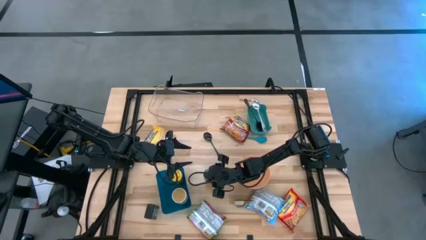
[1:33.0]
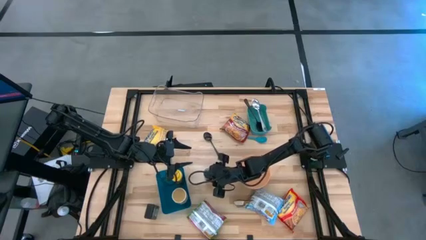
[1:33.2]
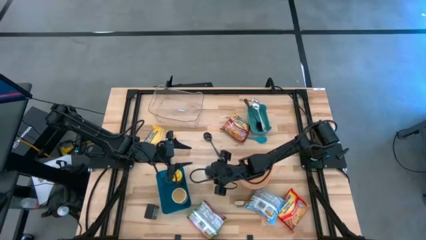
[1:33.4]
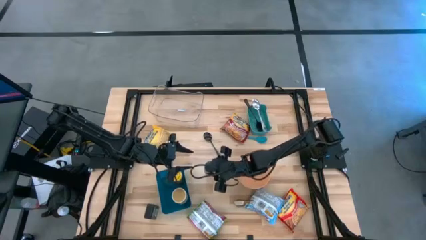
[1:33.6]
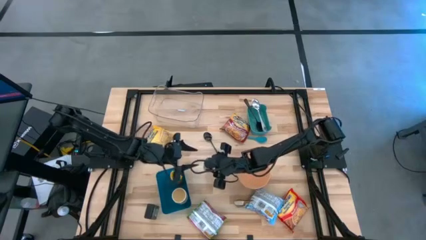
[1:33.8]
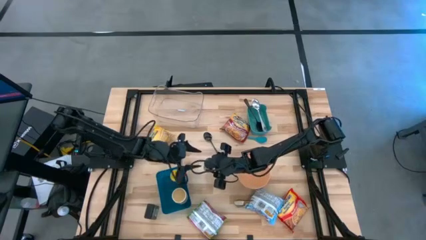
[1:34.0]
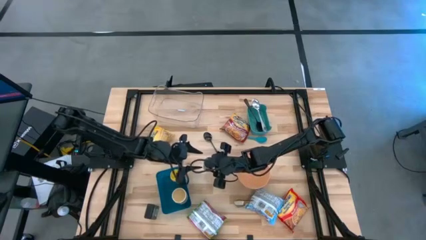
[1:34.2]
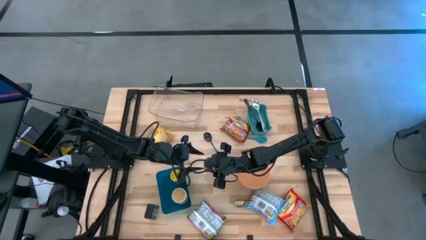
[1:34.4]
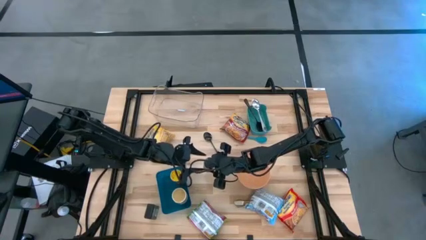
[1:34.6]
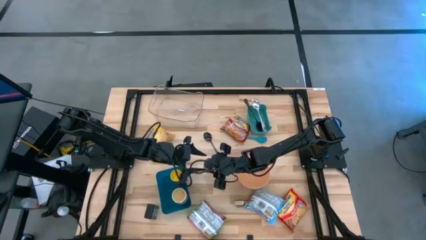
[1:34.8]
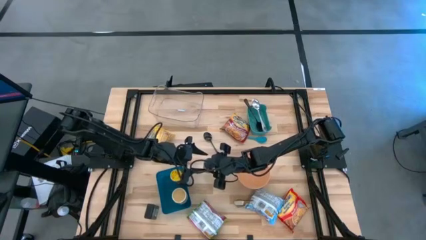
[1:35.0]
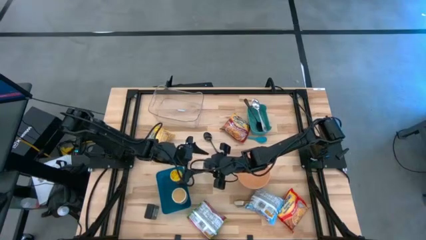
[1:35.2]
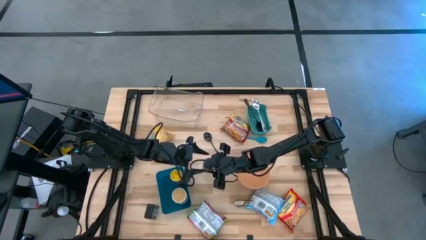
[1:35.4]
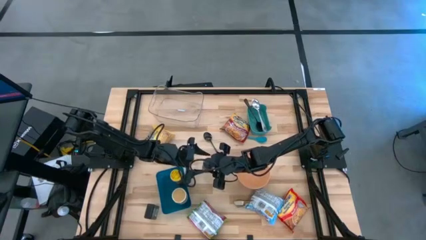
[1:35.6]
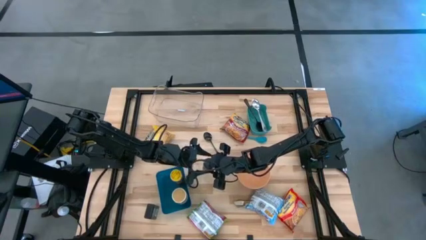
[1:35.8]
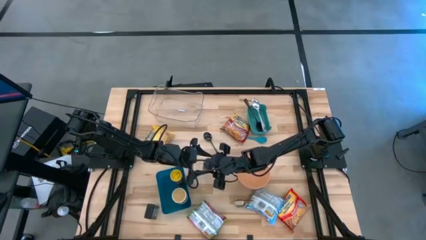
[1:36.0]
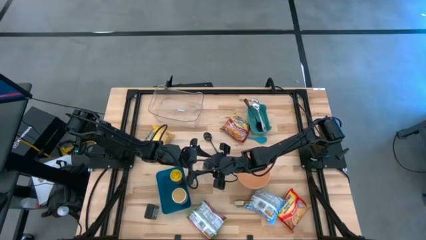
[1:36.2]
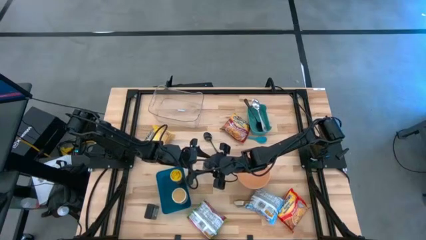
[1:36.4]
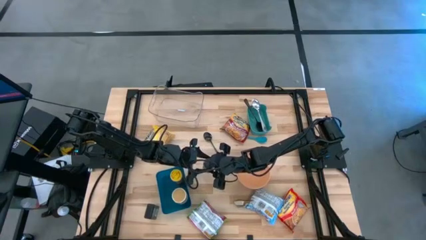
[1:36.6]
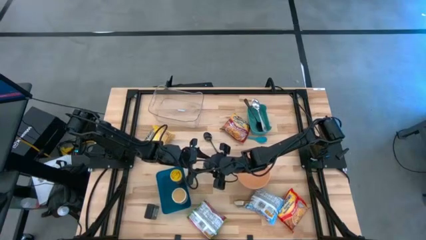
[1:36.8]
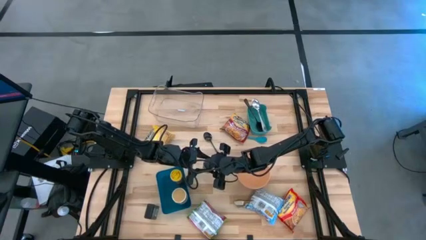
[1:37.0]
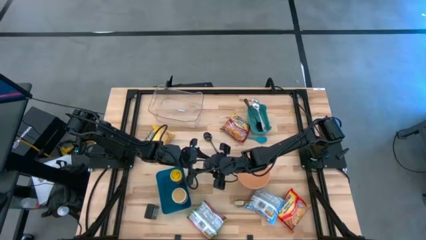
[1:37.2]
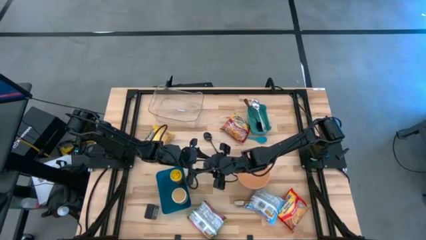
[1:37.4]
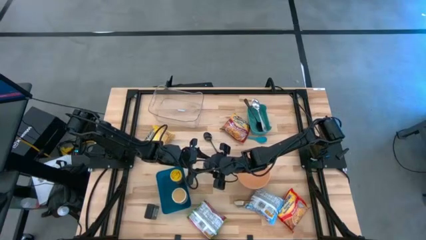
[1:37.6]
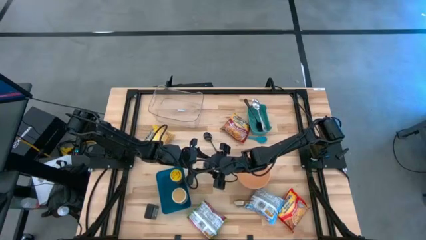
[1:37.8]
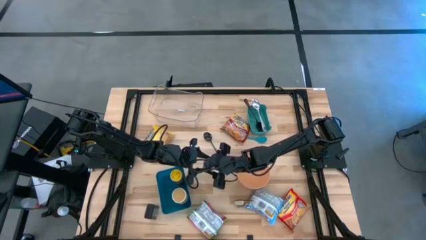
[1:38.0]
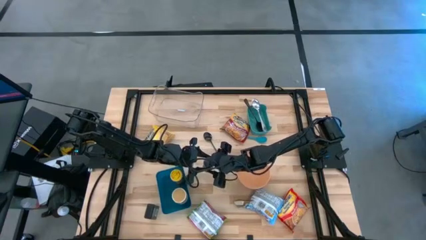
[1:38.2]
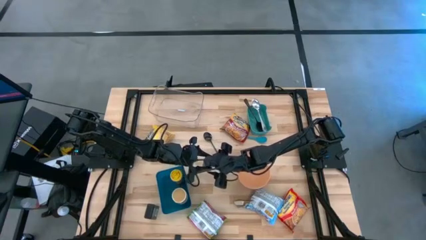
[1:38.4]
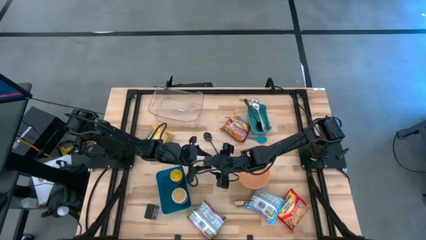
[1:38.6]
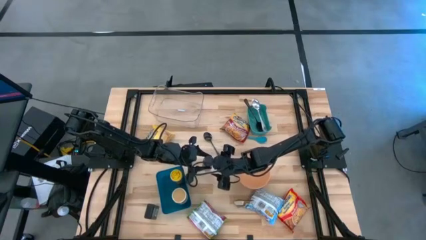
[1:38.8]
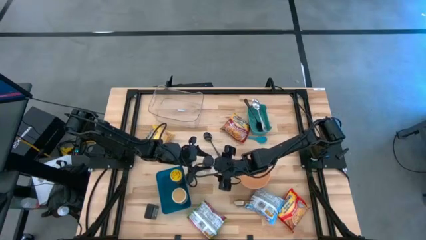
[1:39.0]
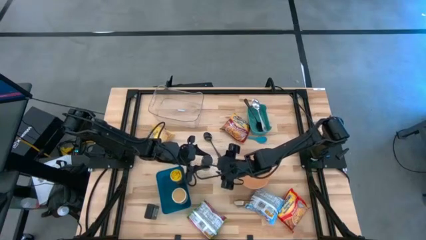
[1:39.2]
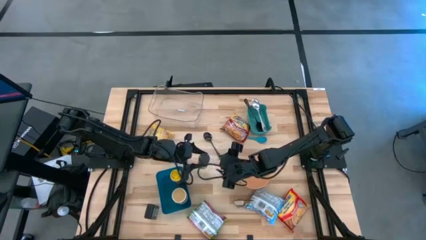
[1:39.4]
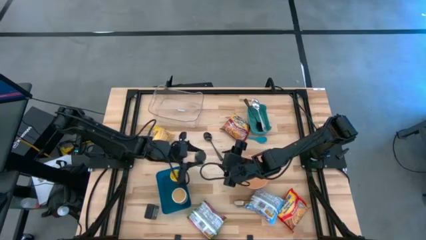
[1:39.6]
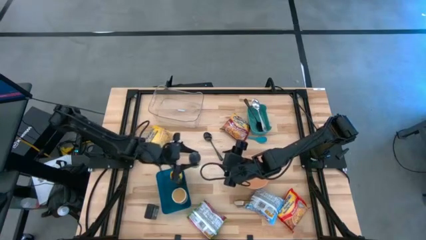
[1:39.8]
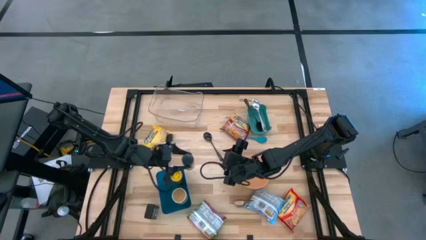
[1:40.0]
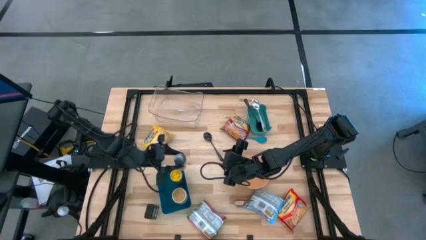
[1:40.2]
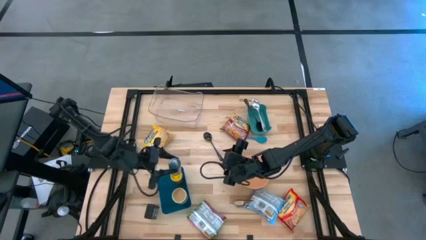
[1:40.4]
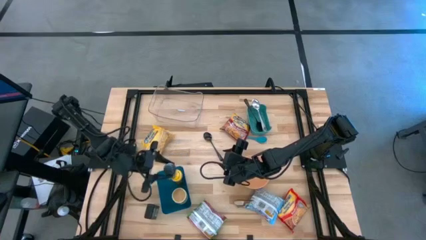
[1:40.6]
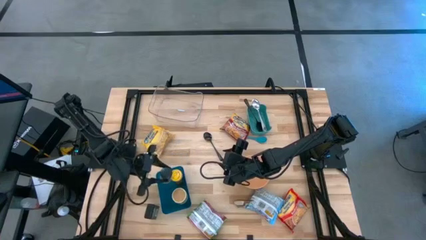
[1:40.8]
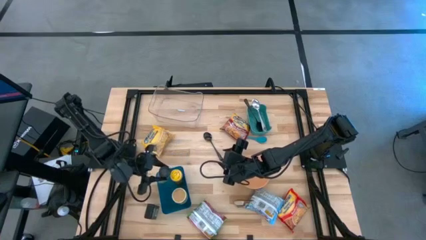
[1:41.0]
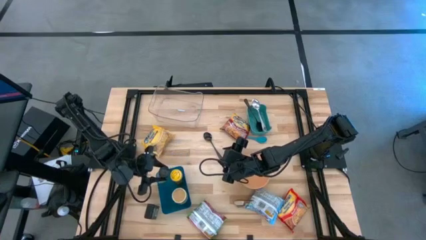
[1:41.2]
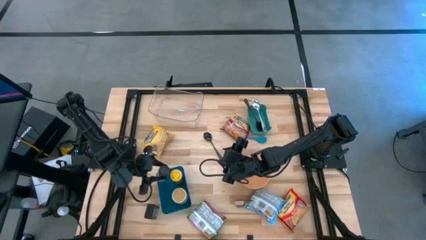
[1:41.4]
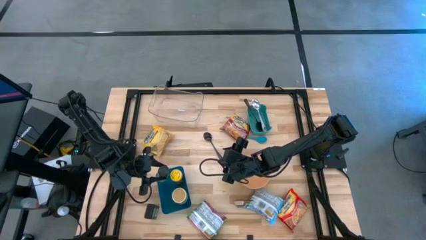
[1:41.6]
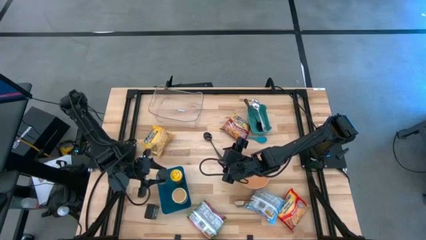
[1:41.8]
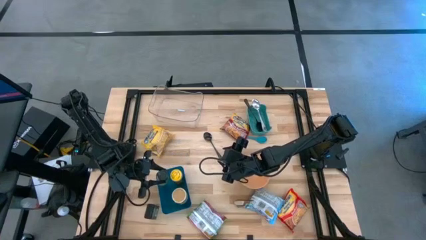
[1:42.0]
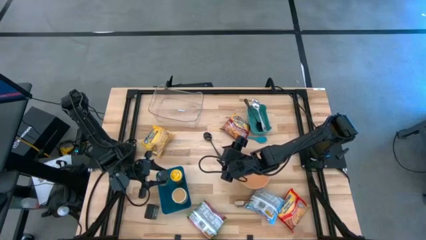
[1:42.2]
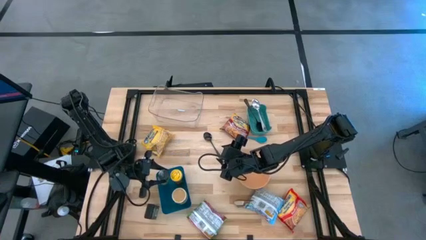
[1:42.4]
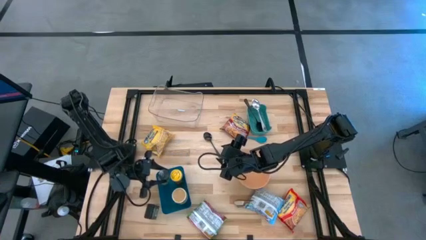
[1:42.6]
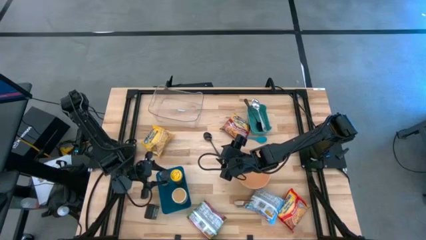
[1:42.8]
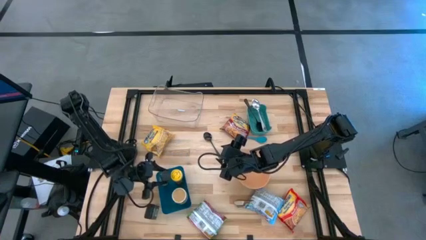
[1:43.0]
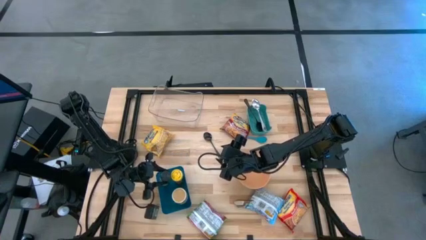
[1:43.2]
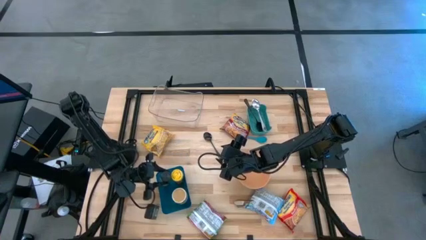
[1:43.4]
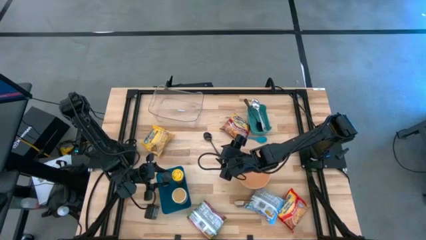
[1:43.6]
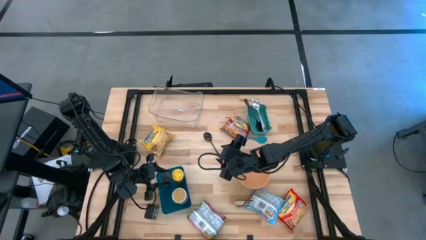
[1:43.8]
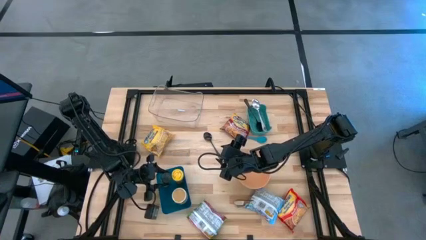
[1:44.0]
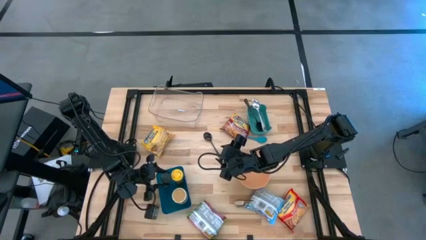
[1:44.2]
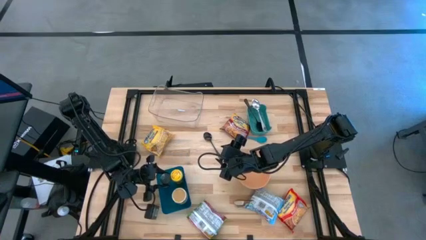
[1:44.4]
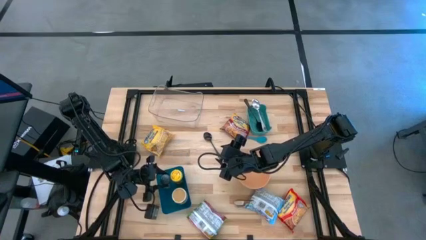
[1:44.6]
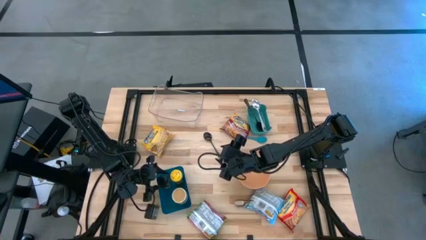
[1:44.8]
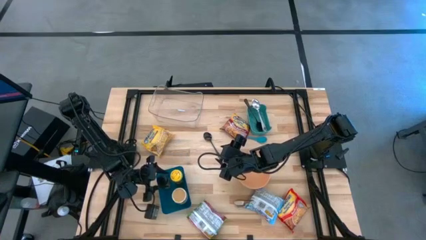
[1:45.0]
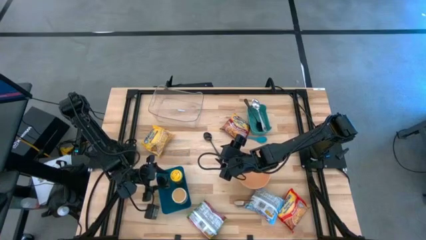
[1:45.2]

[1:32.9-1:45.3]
Task: Pick & Place Food Item
Put the green seasoning bottle into the blue bin

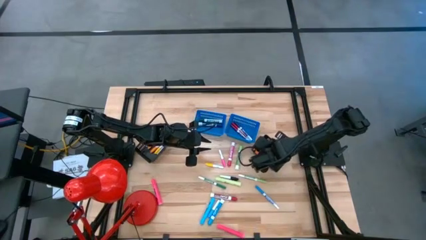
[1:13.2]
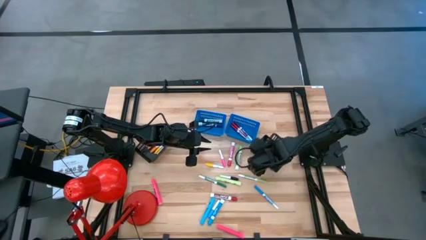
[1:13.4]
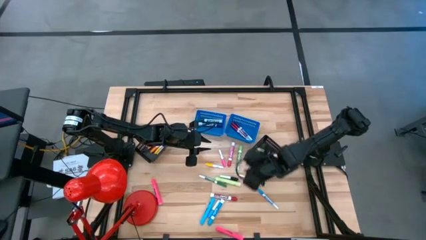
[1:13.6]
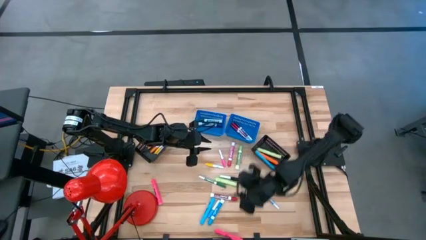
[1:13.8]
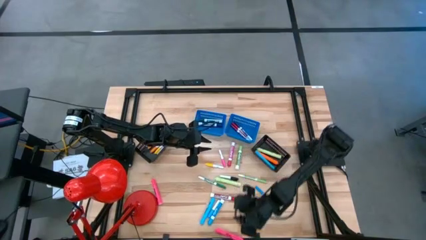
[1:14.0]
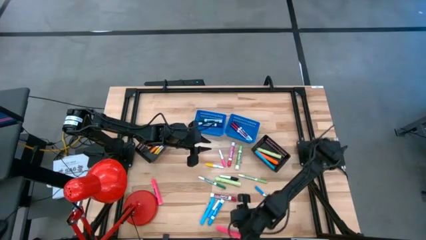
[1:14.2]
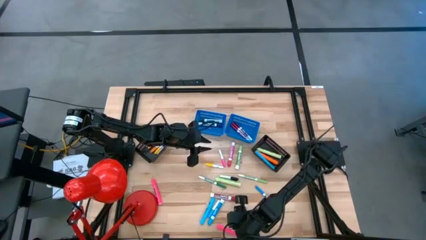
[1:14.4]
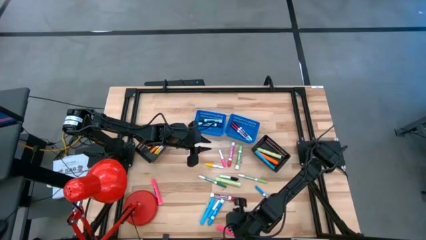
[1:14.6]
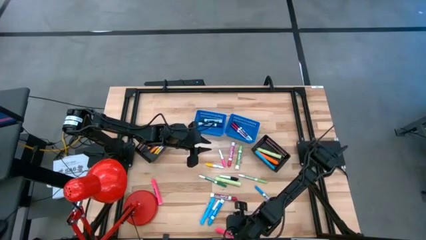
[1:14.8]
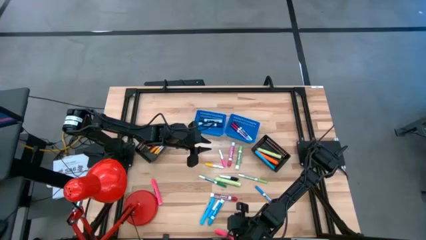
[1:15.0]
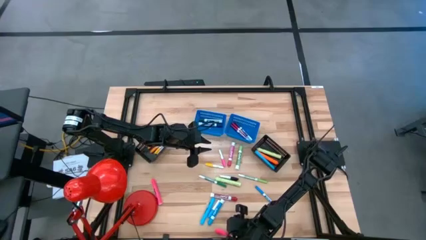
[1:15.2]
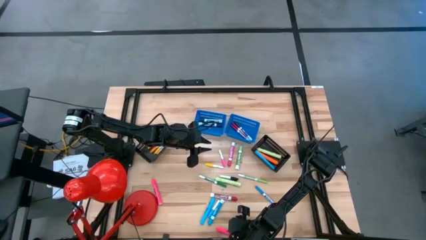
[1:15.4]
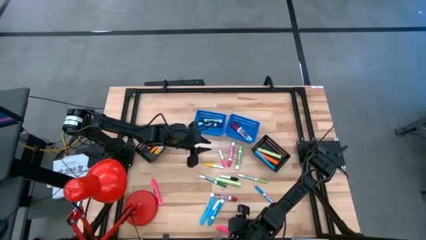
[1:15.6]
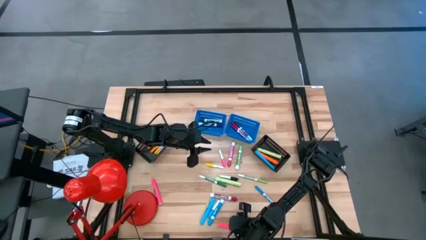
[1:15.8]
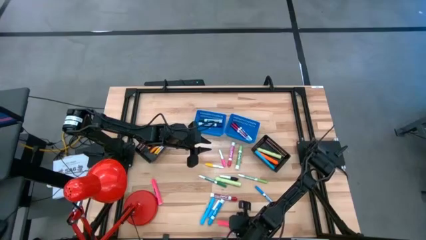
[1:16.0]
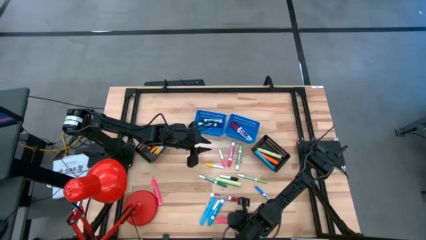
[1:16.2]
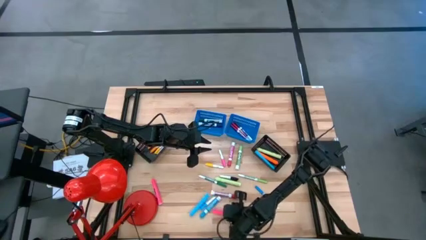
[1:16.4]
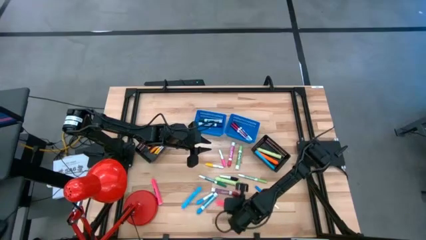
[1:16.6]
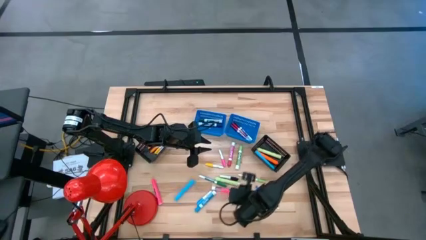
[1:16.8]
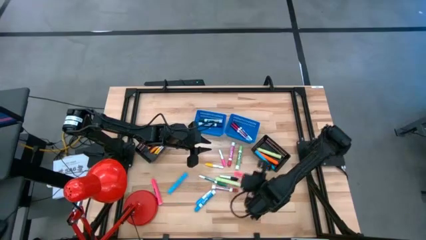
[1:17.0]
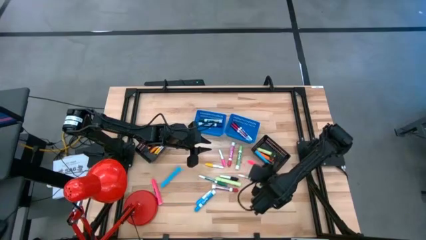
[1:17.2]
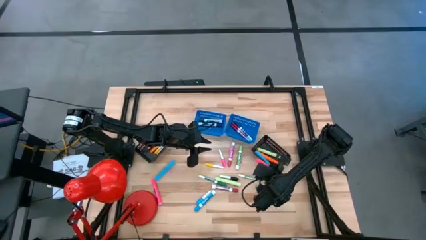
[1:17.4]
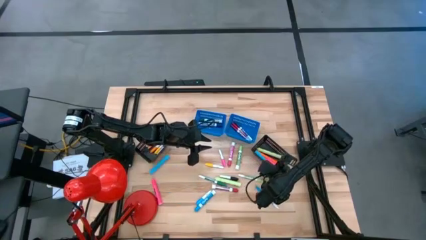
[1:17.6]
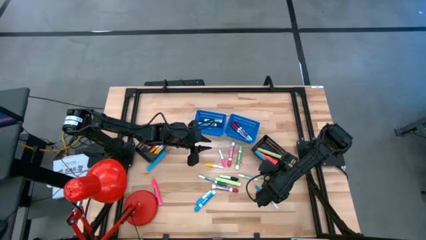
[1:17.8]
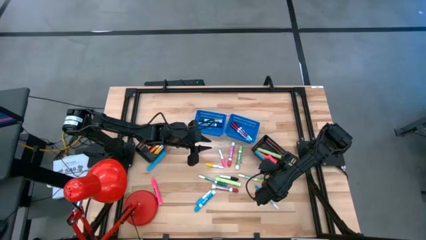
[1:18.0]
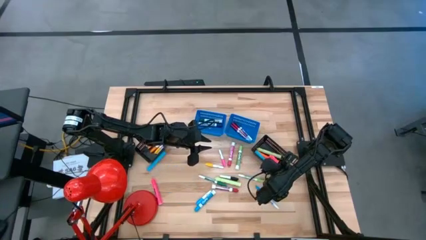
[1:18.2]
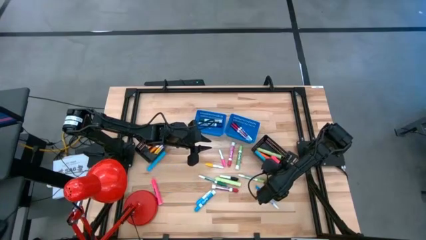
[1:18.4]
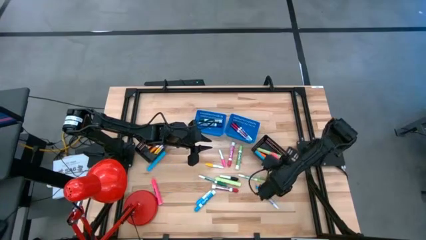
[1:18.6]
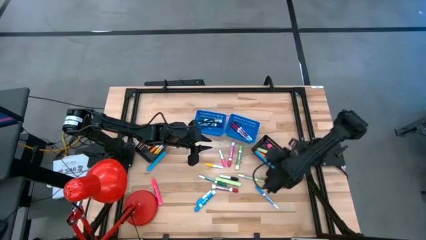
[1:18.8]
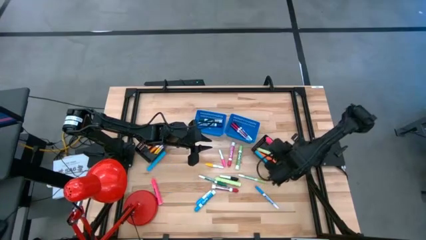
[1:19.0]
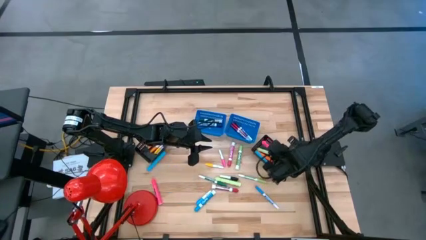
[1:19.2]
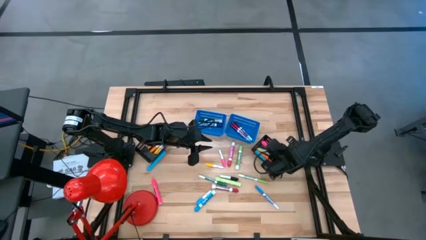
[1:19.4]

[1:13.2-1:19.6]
Task: Pick & Place Markers
Put the pink highlighter into the right black bin
